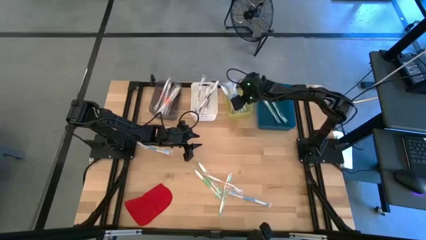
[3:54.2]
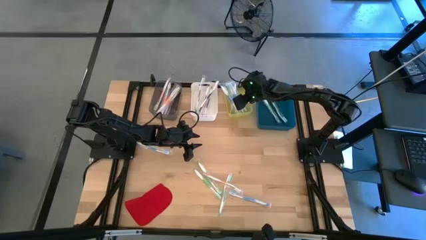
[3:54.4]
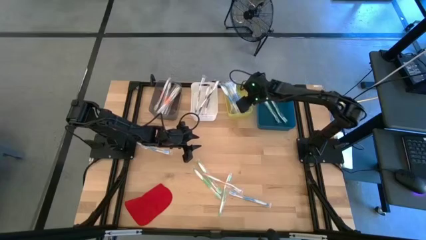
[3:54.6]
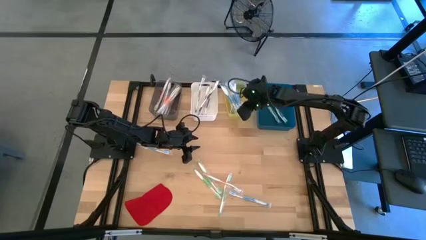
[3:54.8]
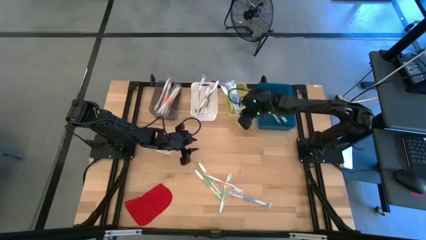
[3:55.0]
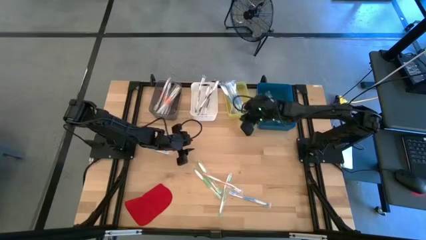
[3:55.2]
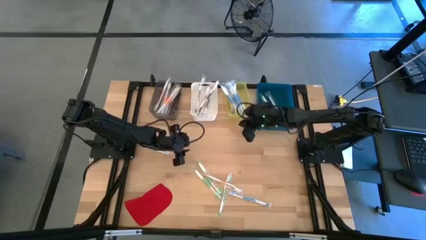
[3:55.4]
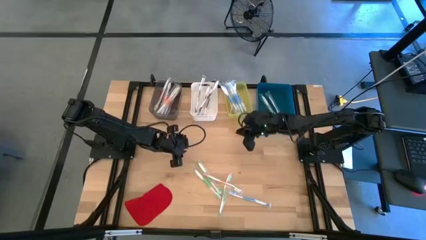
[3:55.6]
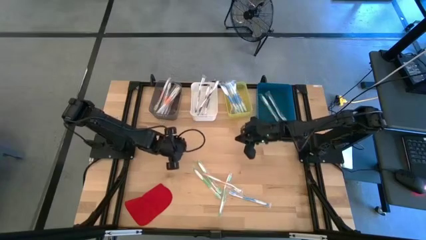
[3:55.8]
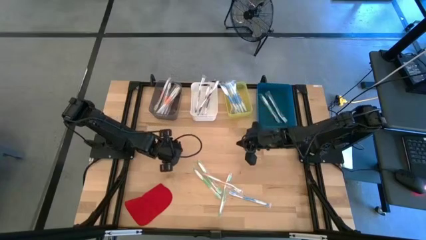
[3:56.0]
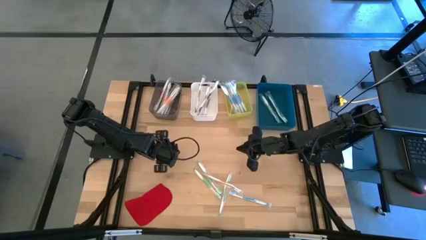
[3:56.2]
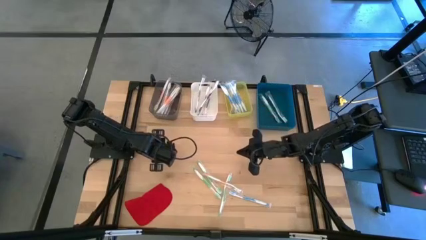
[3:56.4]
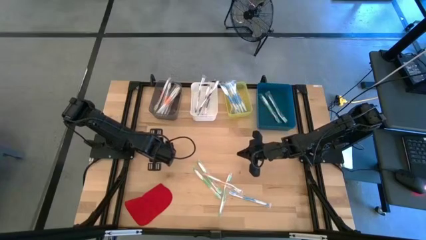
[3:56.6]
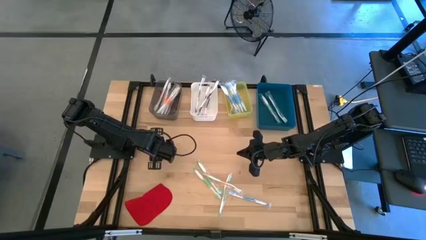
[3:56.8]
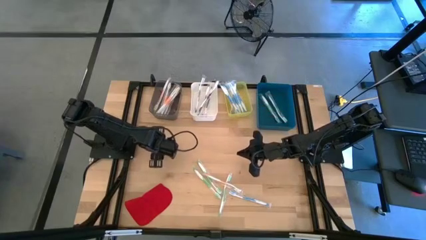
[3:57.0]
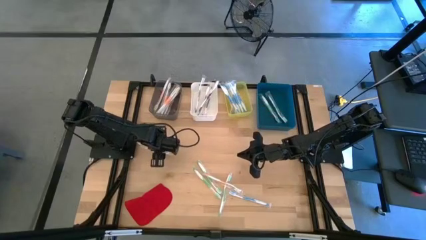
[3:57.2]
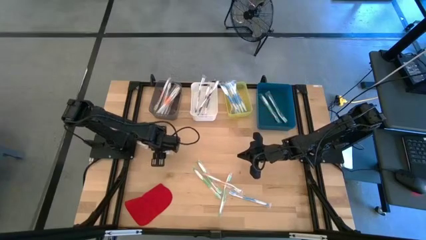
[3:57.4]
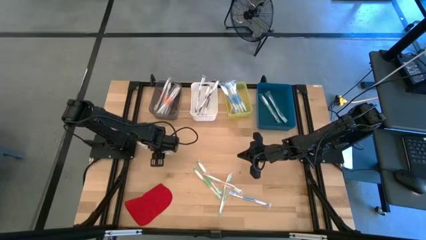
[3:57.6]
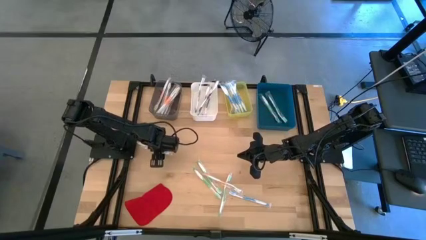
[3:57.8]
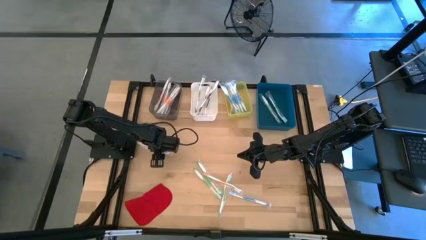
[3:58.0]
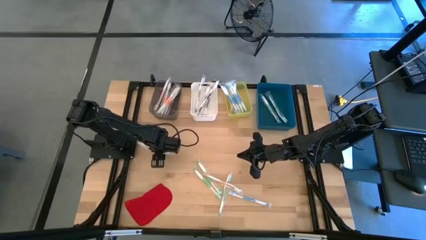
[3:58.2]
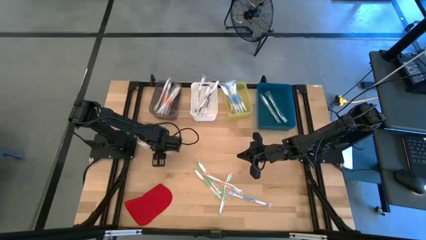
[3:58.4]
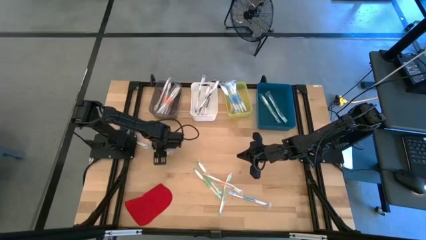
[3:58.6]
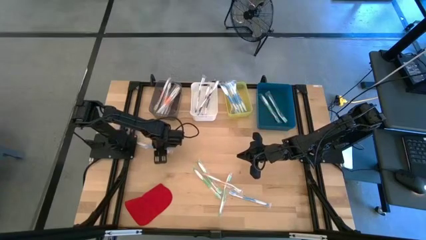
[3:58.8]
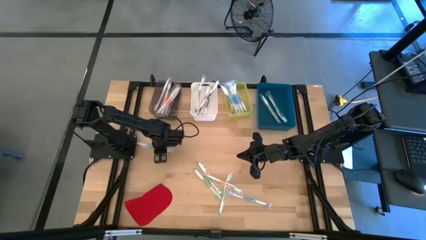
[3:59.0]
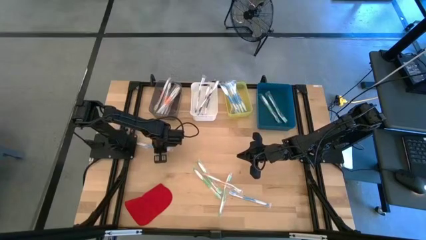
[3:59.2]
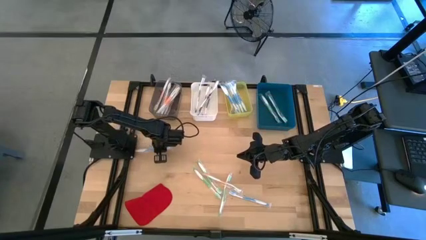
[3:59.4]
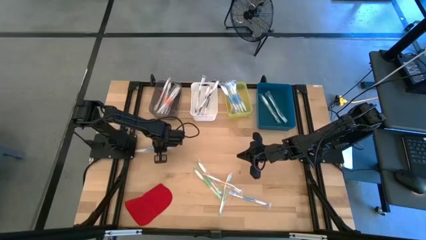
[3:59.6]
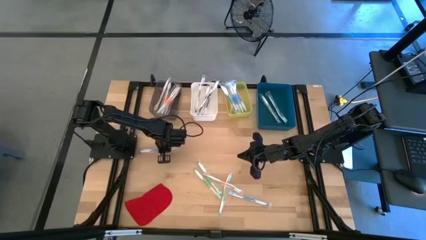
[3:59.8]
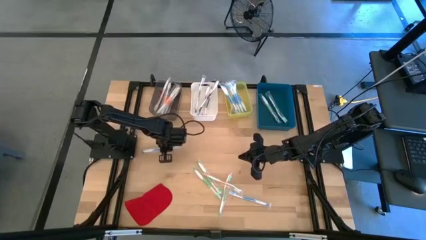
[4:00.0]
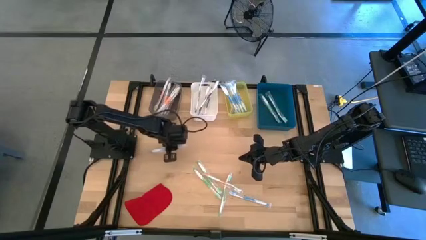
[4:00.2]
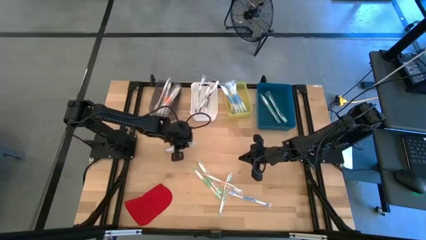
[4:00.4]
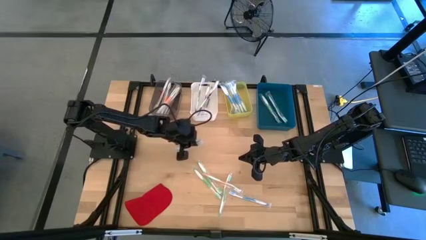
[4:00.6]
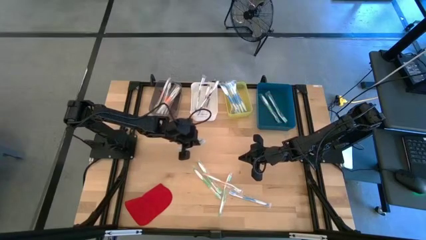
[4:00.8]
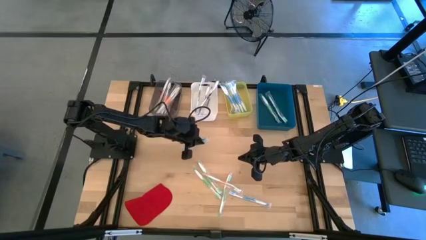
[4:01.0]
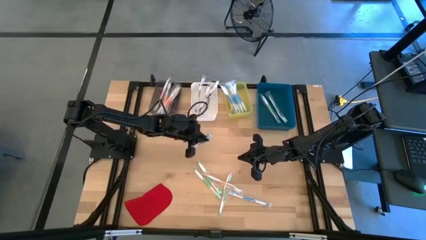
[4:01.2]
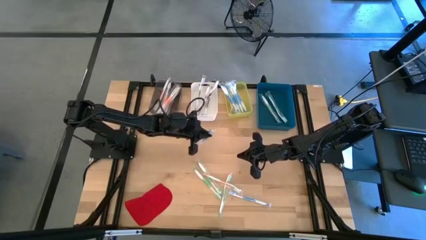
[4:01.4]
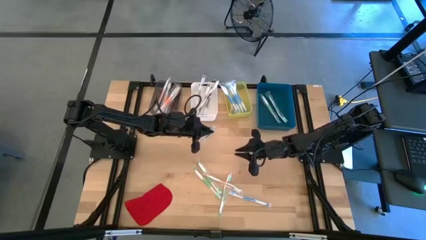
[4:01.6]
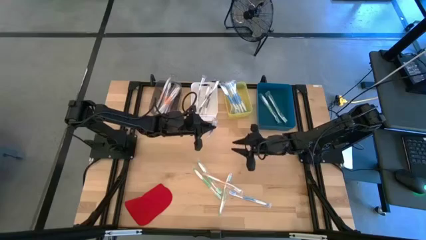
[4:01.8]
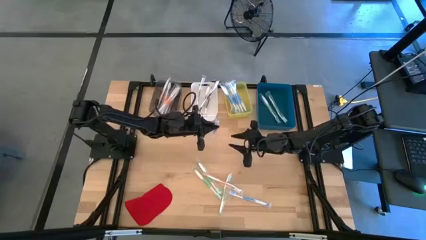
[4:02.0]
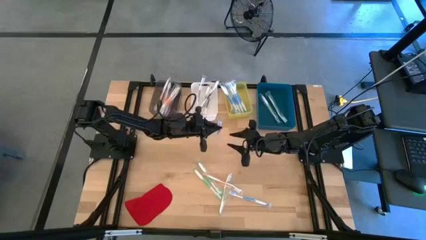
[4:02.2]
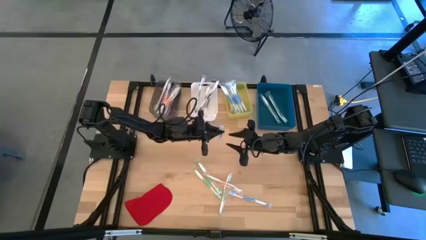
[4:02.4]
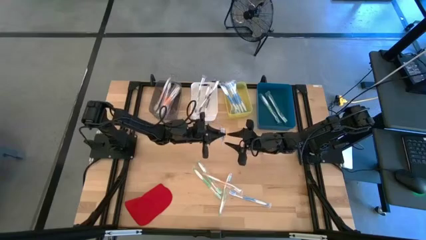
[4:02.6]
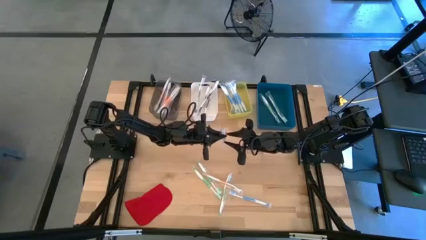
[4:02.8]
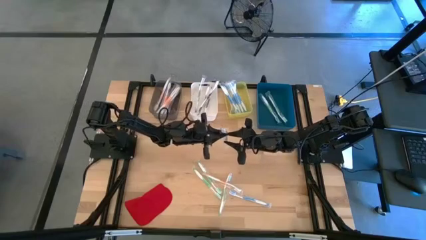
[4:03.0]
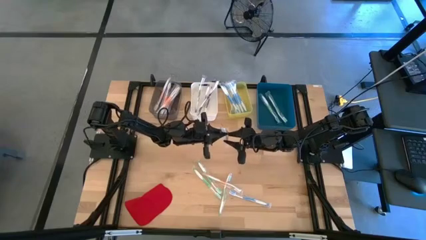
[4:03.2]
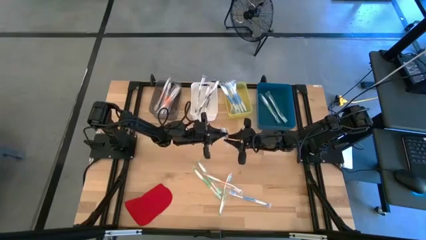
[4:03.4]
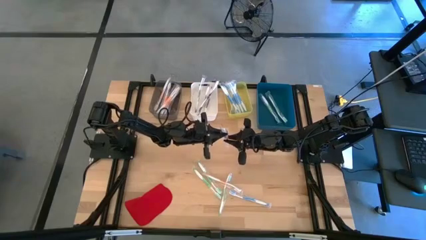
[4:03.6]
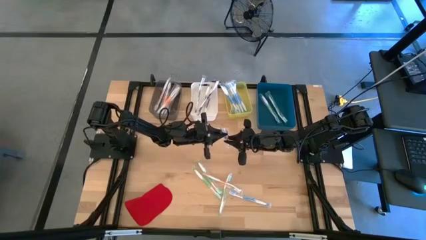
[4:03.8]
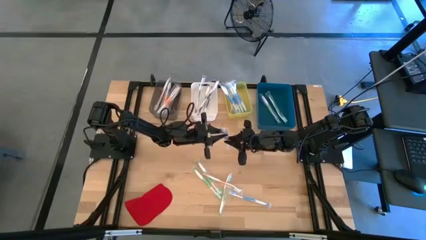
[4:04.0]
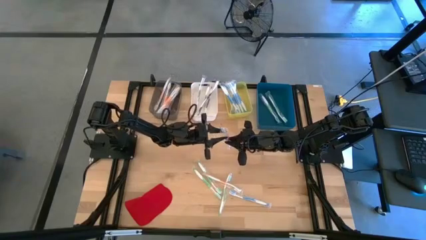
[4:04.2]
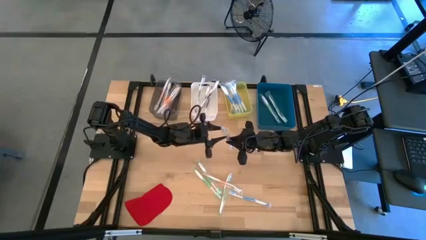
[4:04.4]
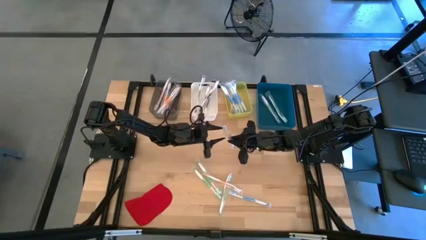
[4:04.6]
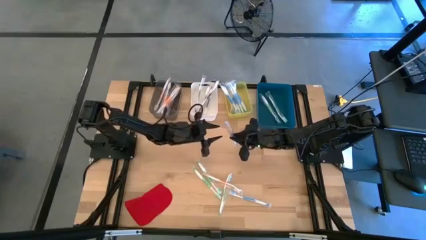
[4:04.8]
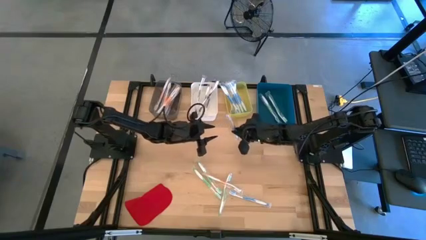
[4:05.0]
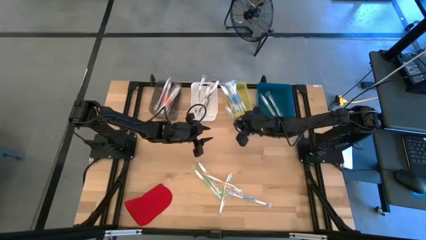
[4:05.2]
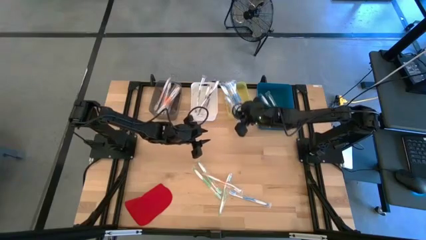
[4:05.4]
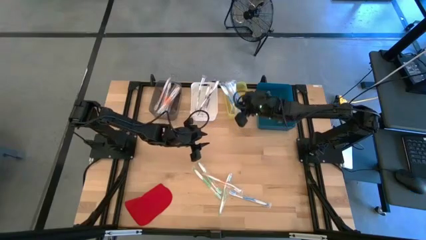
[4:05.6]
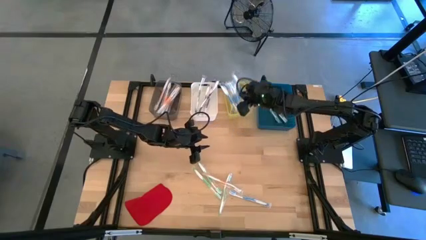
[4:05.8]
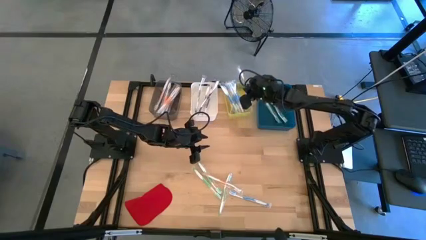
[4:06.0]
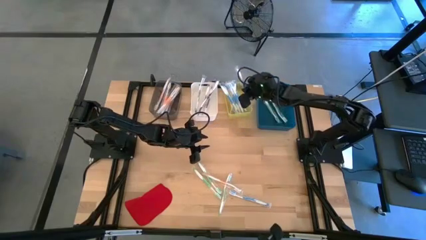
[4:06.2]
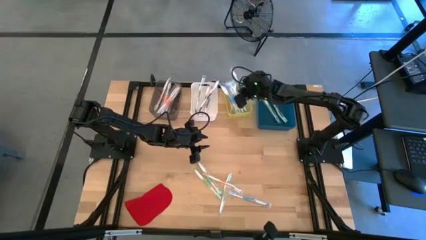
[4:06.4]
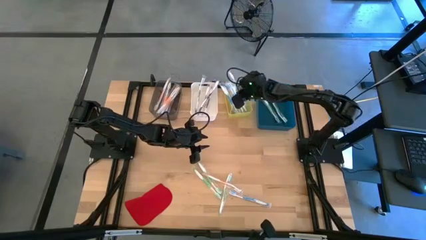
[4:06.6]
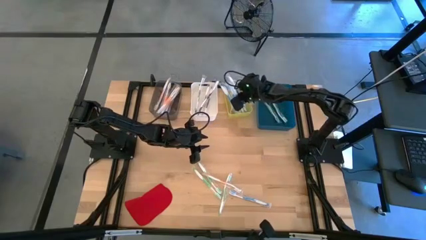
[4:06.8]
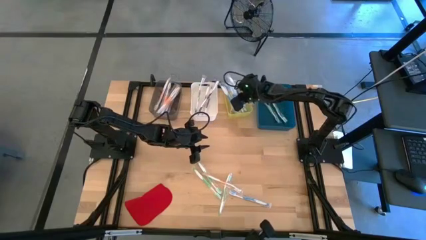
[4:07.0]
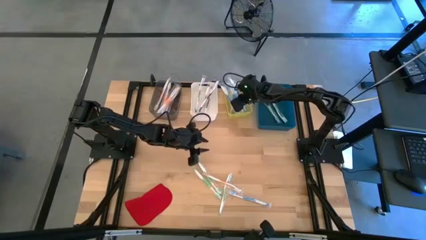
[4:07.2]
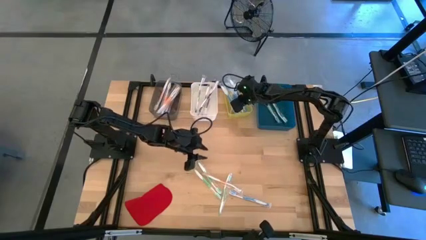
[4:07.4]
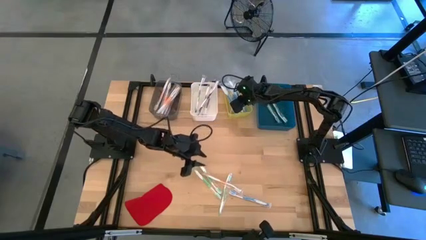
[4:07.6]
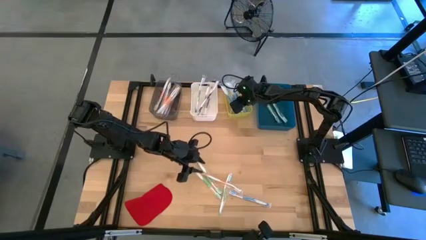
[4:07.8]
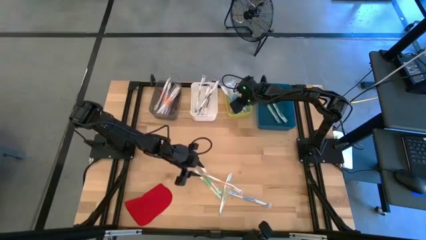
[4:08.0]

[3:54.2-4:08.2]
Task: Pick & Place Toothbrushes
Put the blue toothbrush into the yellow bin

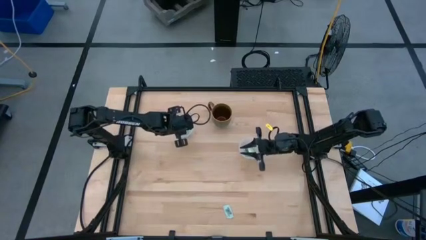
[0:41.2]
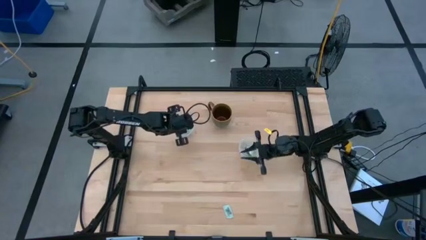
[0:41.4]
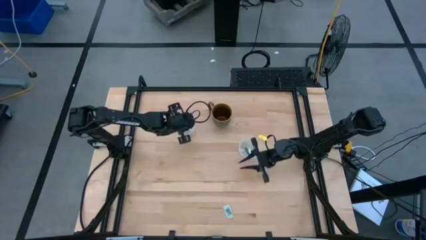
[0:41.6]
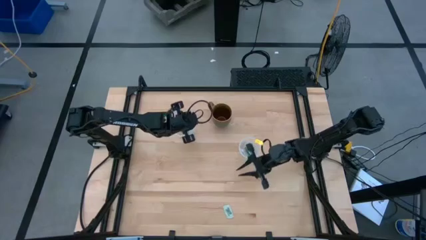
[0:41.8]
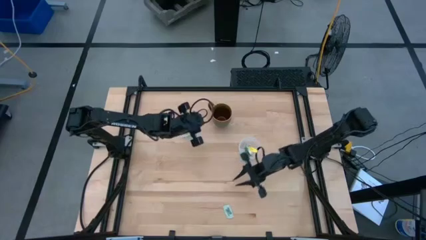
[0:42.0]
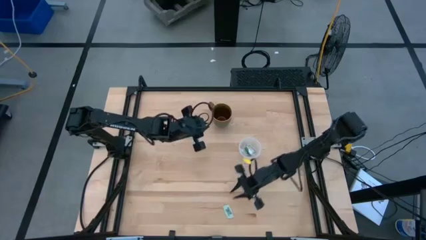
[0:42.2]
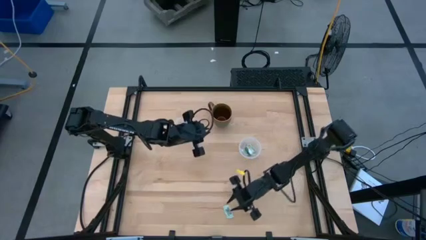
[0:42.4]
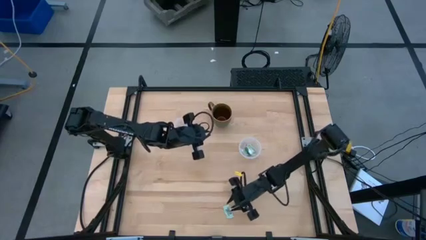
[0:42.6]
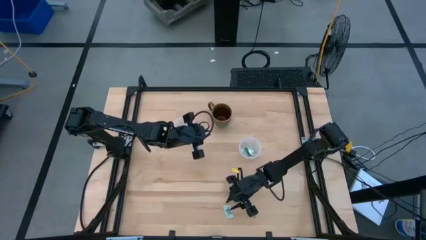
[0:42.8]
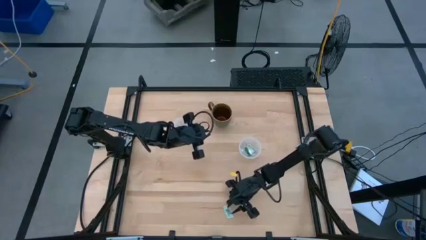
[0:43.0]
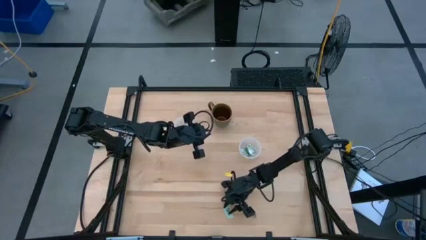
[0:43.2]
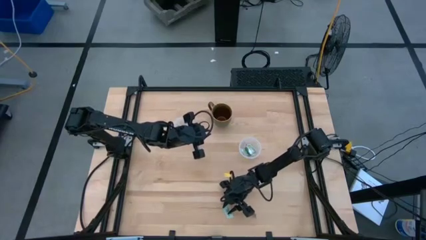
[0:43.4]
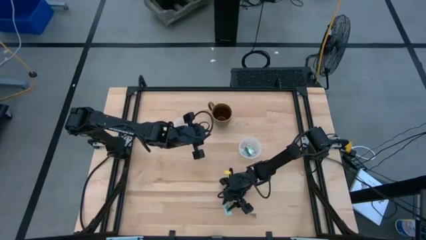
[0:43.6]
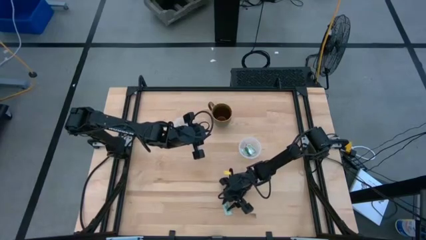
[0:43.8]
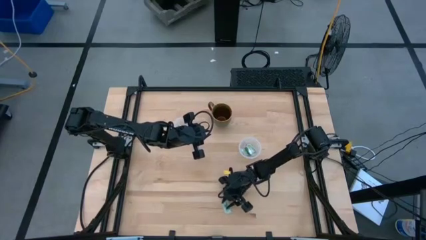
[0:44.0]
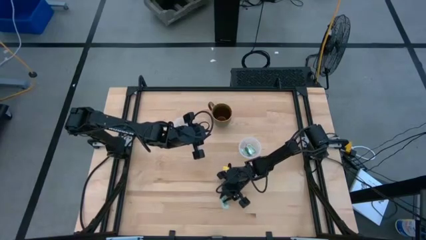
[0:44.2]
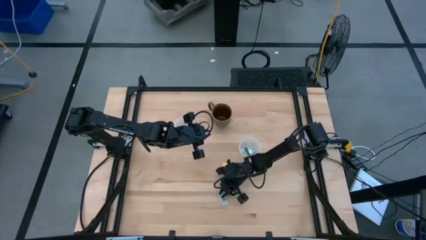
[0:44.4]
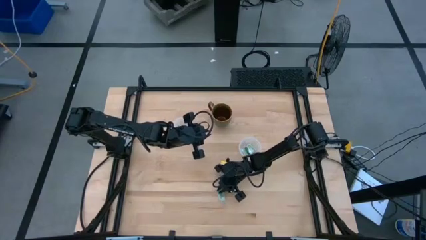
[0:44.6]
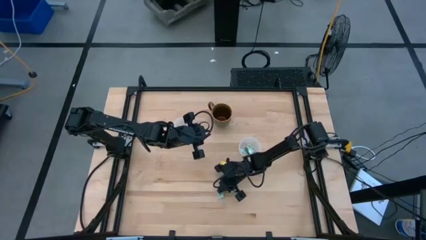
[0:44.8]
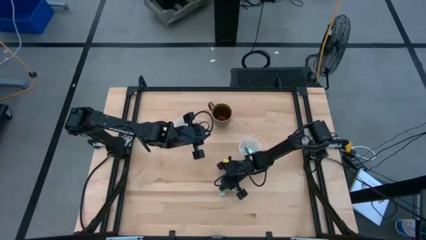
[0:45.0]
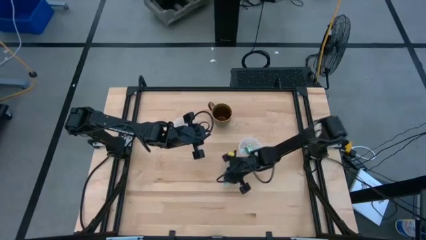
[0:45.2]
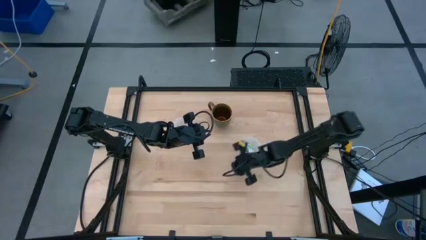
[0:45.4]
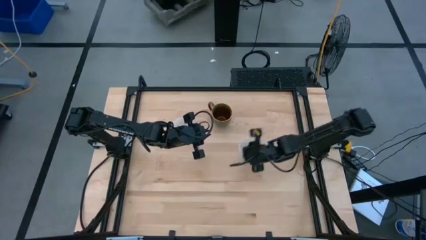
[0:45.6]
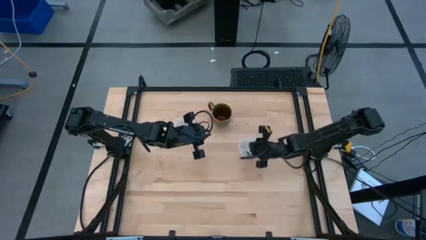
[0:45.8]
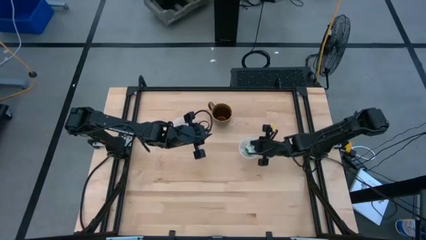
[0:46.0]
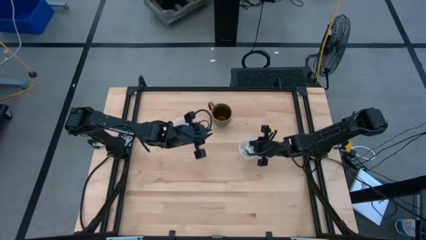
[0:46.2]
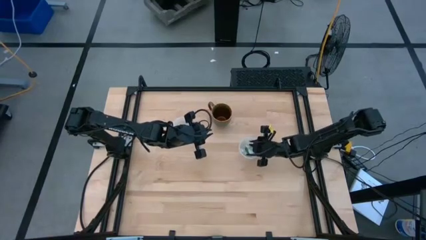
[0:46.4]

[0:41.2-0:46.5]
Task: Pick and place Stevia / Truvia into bins
Put the white stevia packet into the right round transparent container
